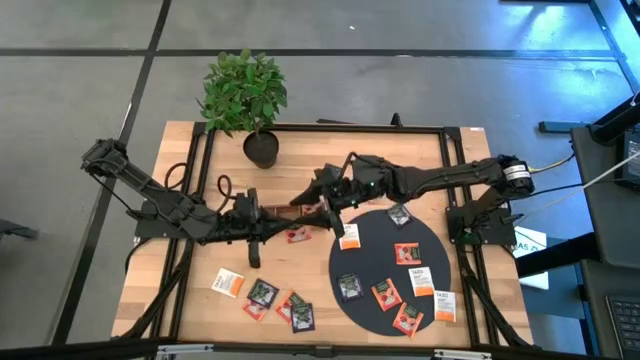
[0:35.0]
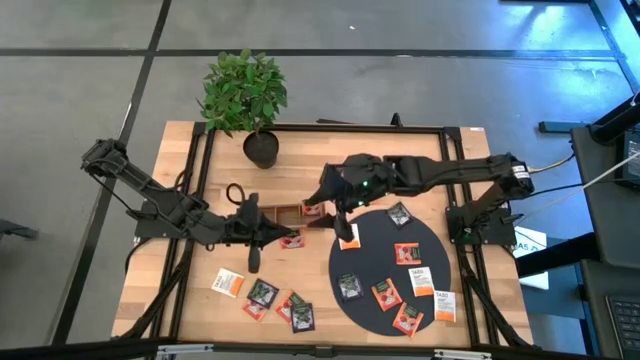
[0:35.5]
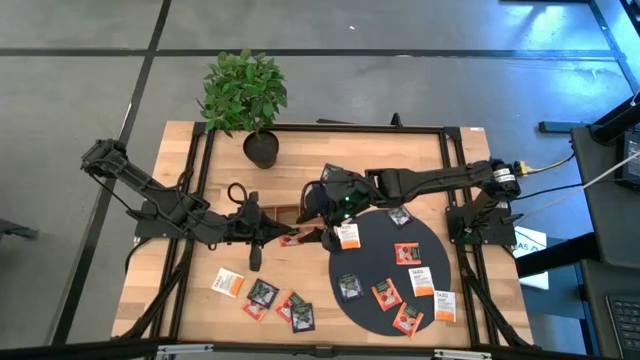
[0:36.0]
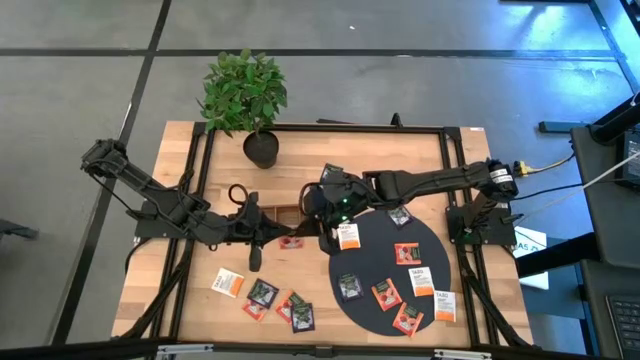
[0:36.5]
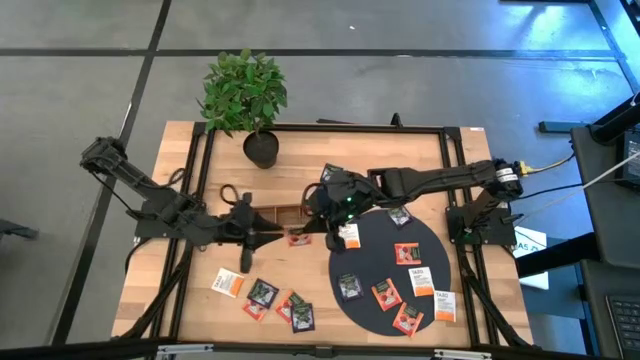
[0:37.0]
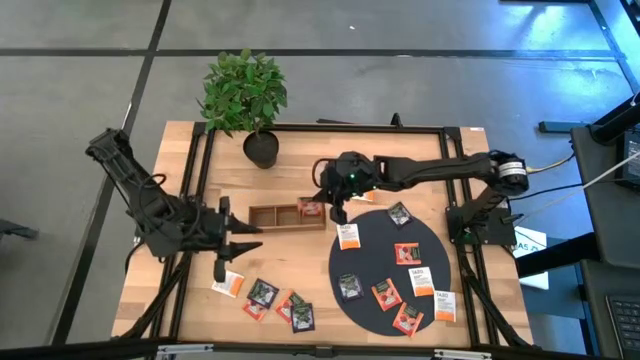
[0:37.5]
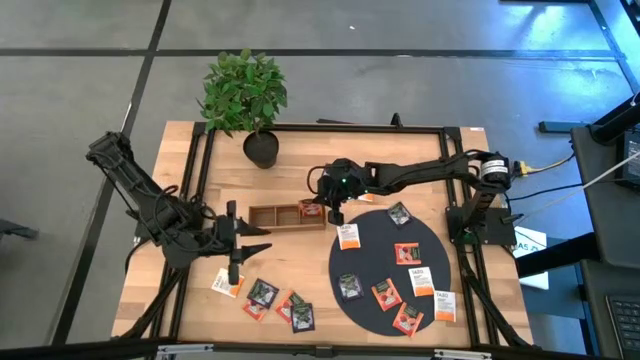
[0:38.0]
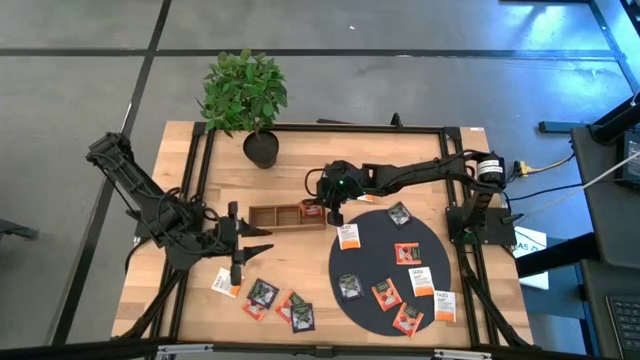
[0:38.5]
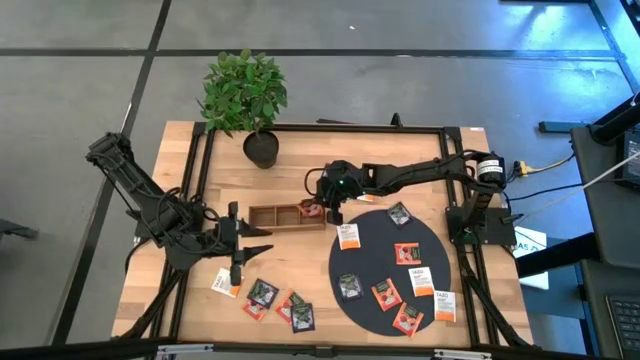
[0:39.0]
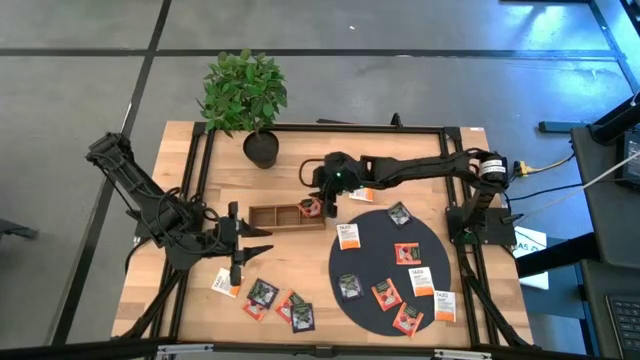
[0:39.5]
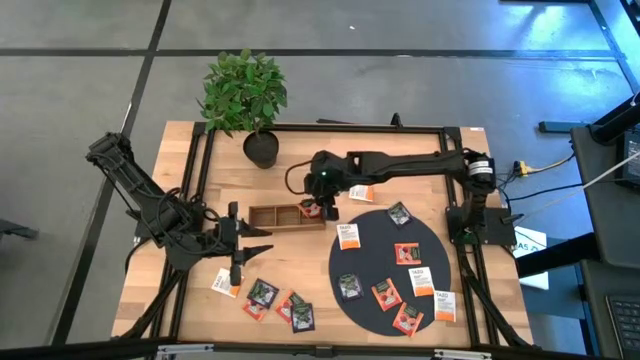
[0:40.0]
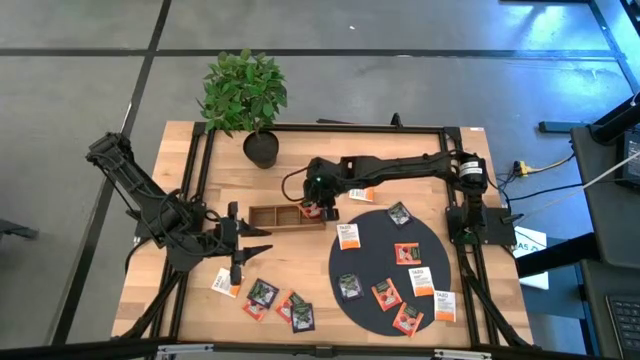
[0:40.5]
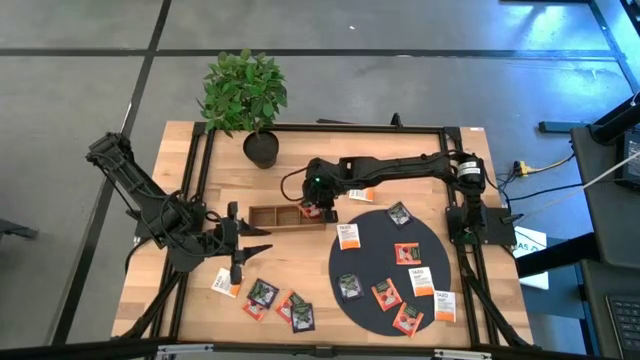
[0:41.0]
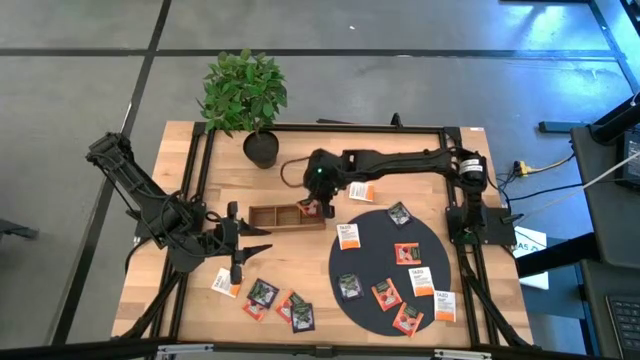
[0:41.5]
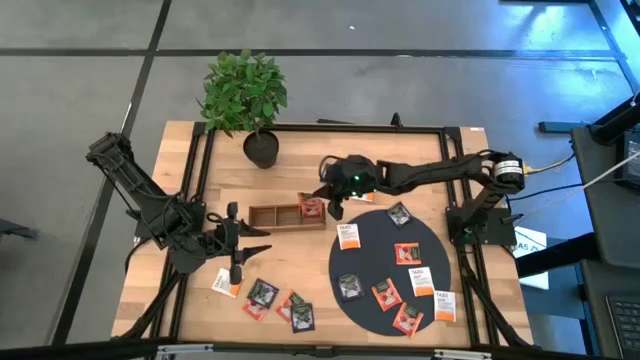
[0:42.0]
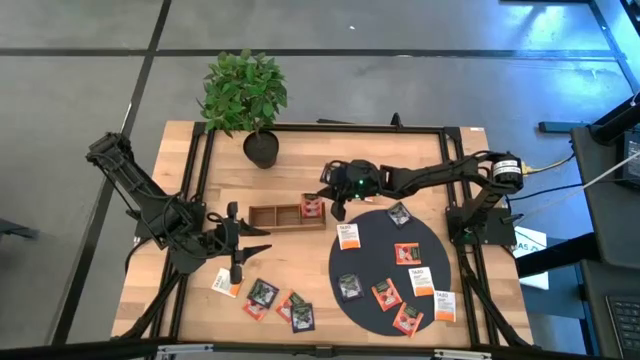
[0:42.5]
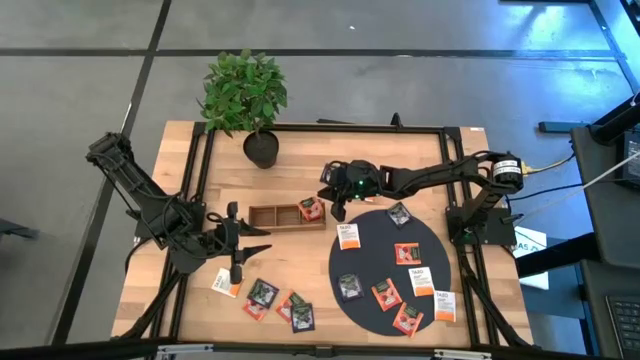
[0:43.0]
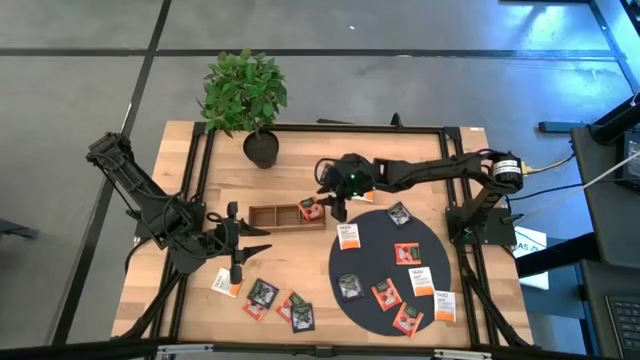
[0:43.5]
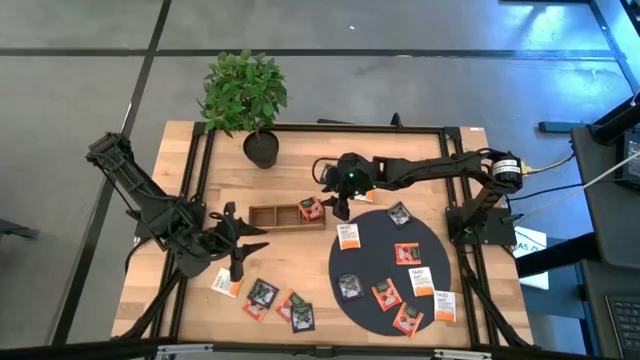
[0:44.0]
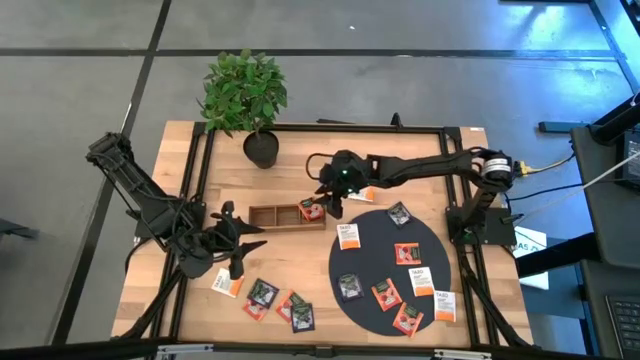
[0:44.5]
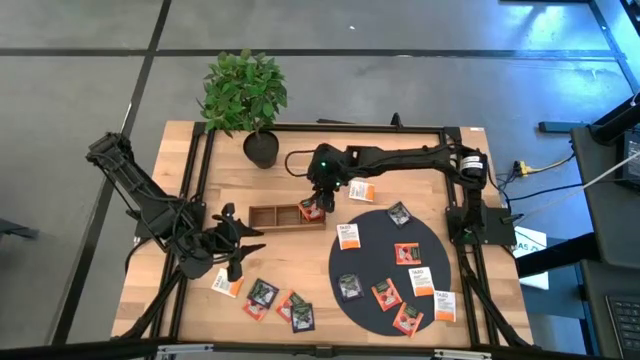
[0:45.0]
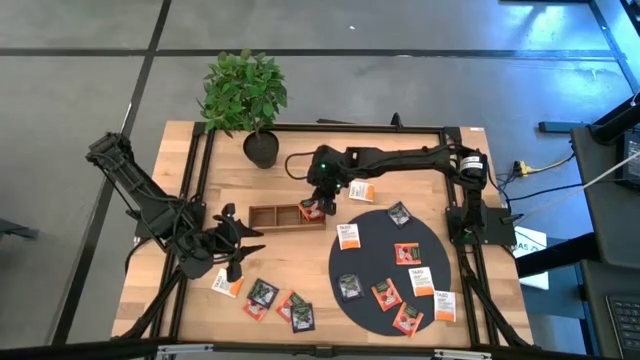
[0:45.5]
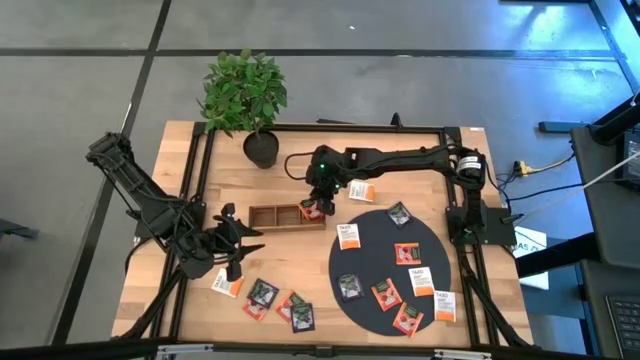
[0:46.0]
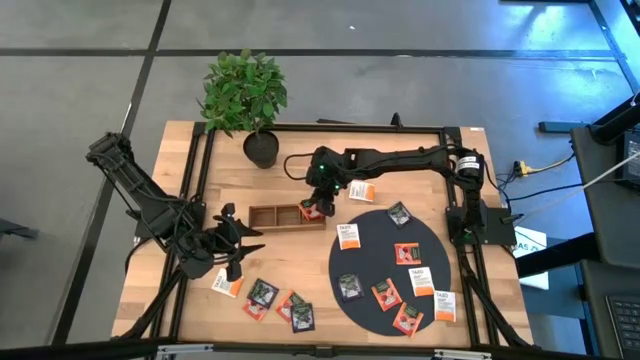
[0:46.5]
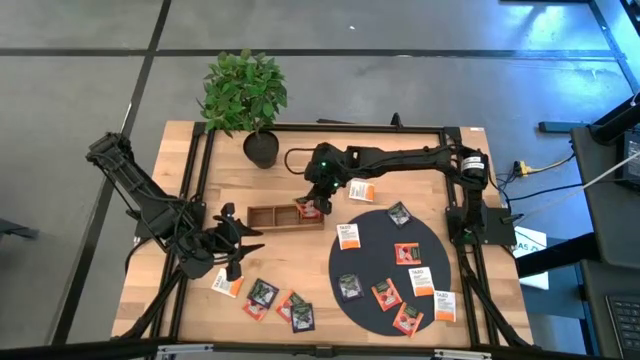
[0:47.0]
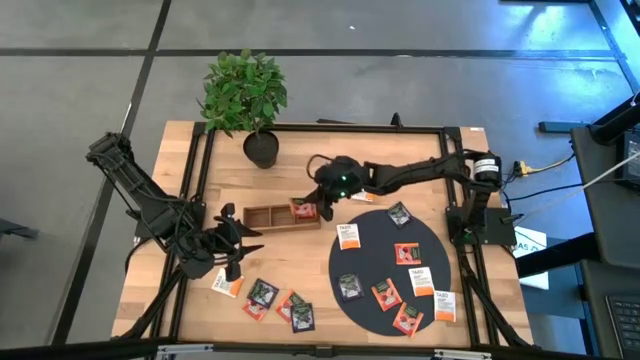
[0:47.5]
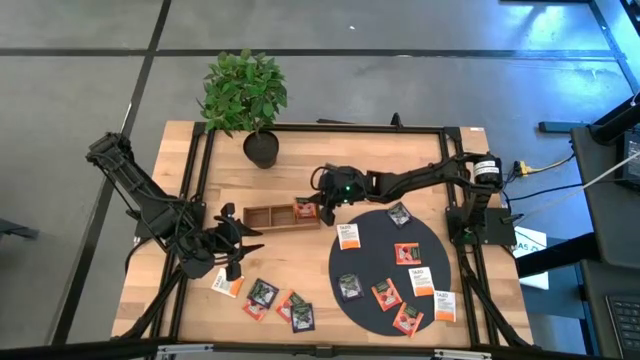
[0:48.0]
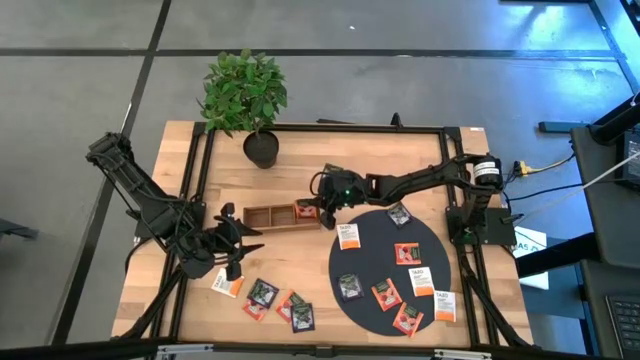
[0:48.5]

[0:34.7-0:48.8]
Task: Pick & Place Tea
Put the orange tea bag into the right section of the wooden organizer

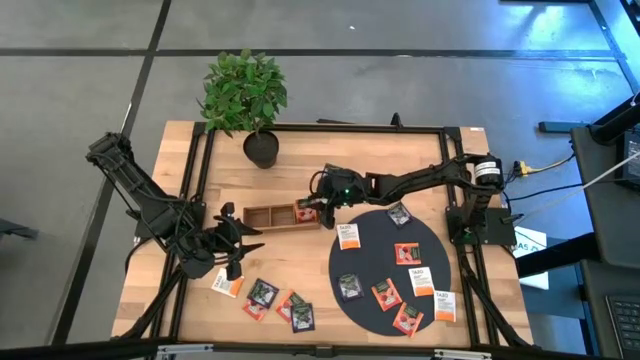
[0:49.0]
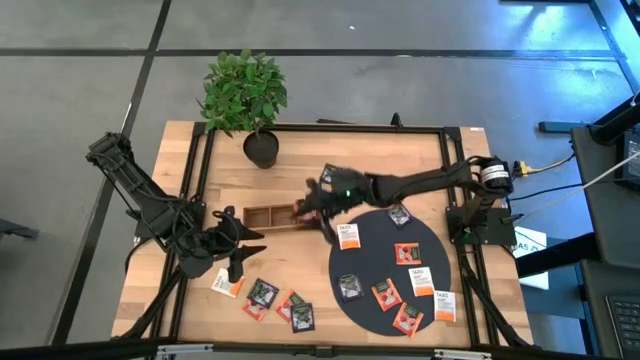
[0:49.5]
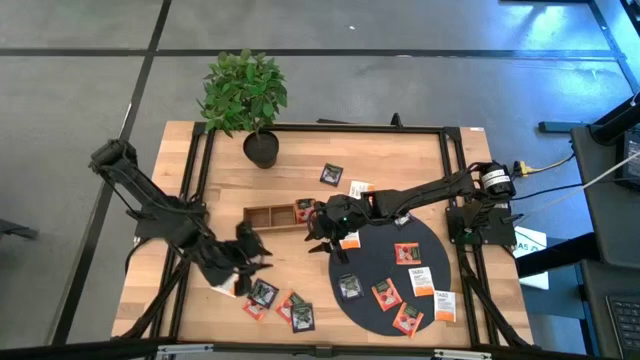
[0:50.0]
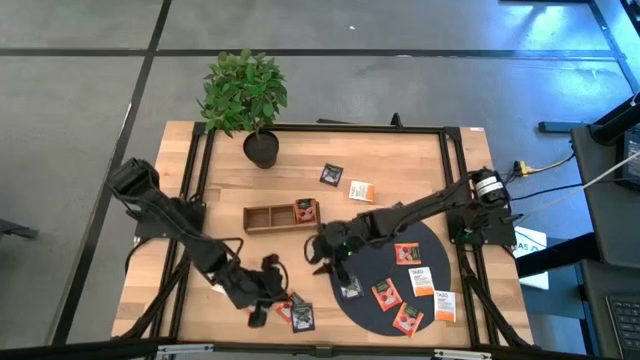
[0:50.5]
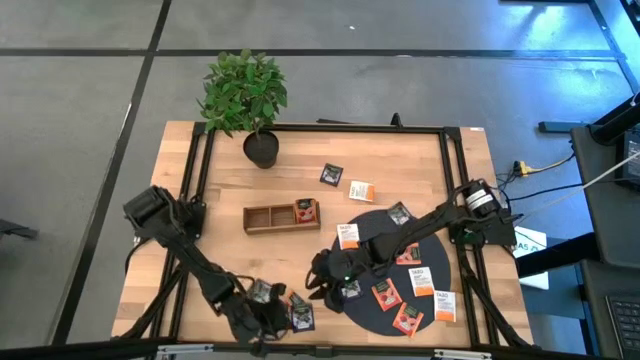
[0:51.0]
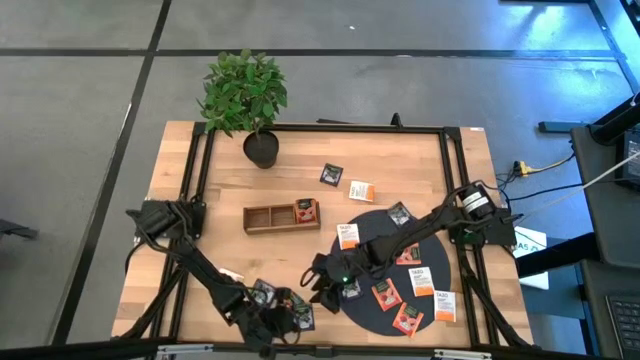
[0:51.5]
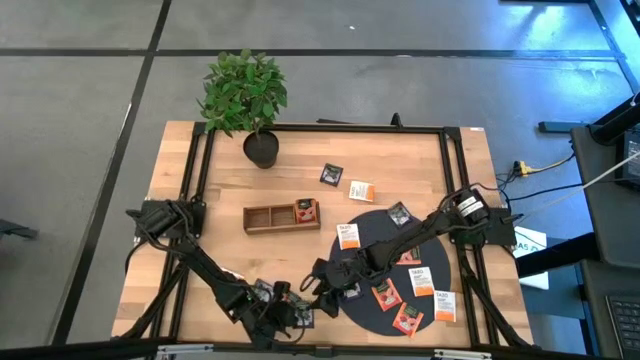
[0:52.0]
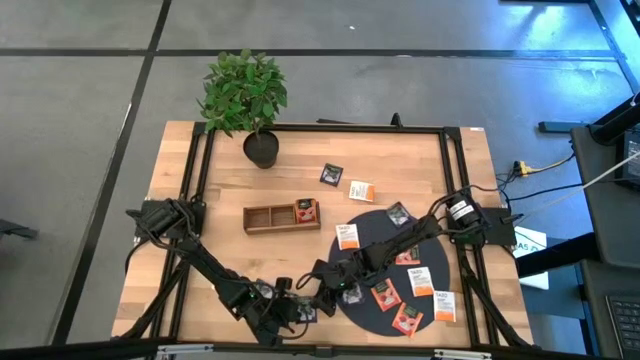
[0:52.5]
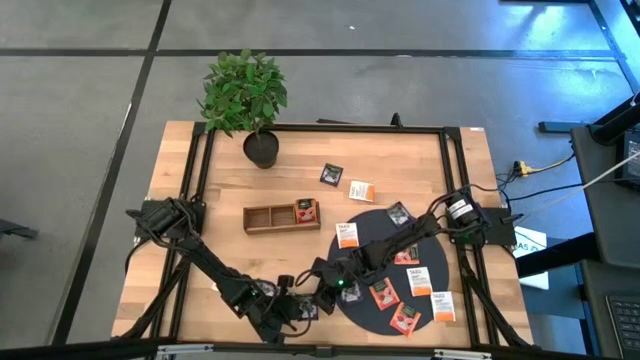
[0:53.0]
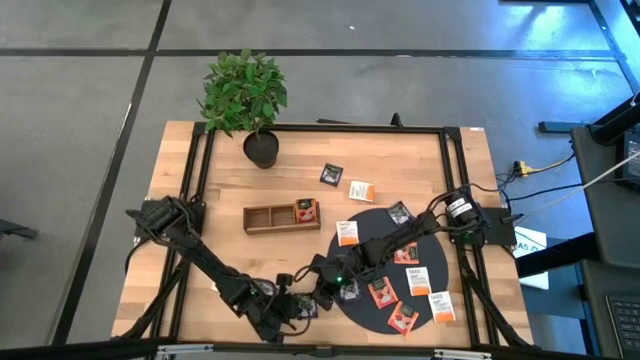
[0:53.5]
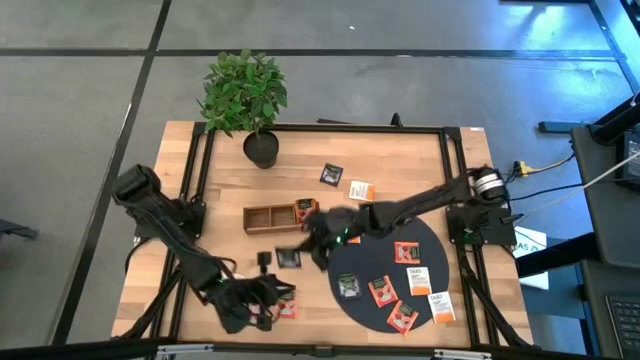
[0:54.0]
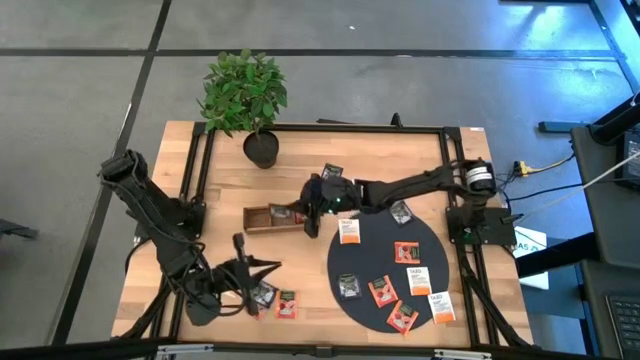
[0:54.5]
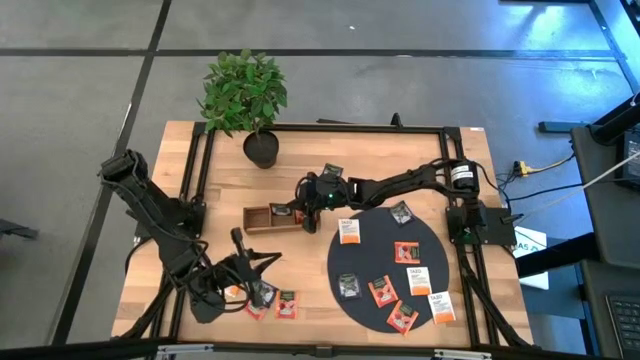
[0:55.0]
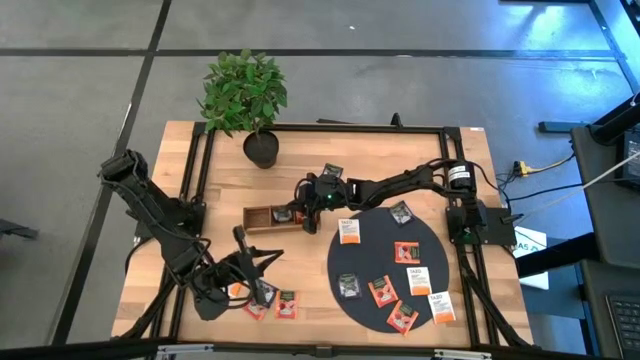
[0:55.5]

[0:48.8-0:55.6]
Put the purple tea bag into the middle section of the wooden organizer
